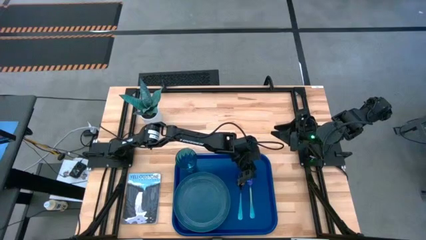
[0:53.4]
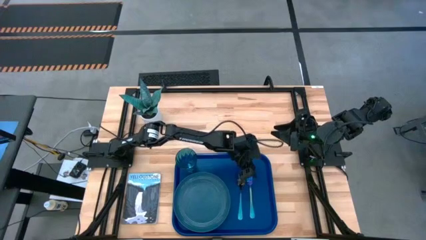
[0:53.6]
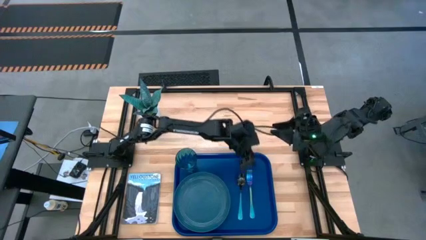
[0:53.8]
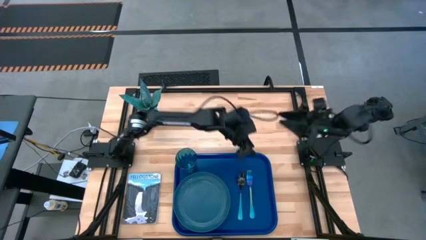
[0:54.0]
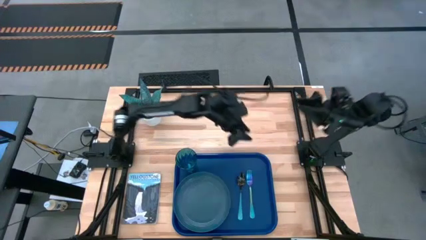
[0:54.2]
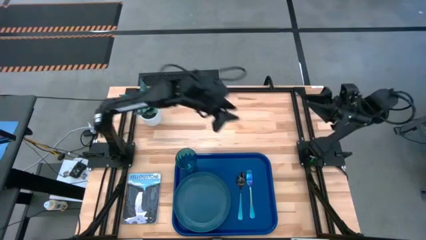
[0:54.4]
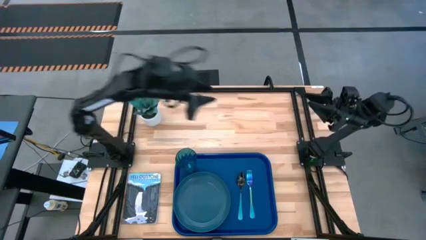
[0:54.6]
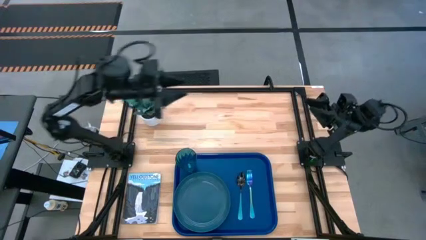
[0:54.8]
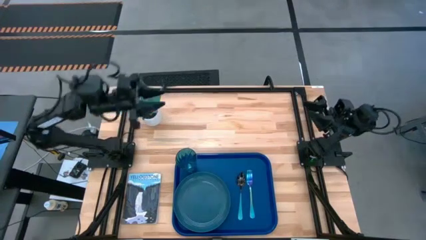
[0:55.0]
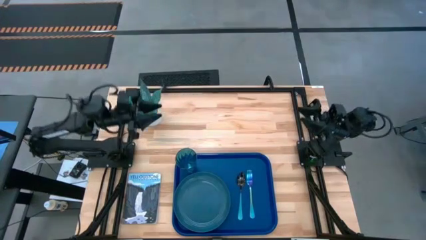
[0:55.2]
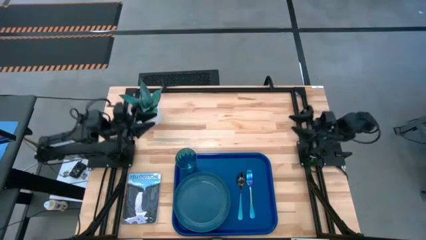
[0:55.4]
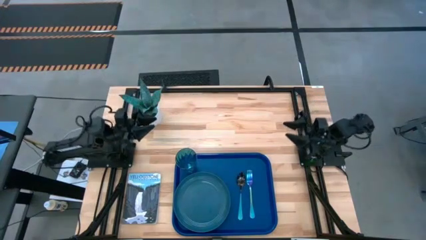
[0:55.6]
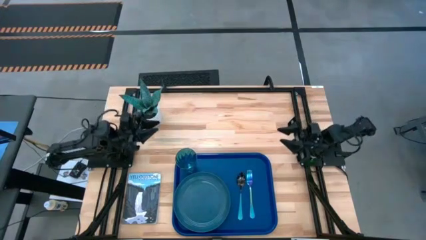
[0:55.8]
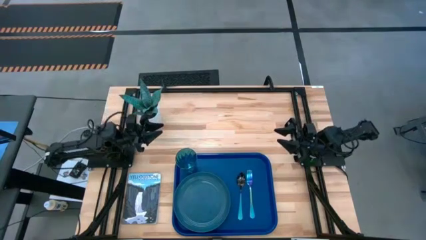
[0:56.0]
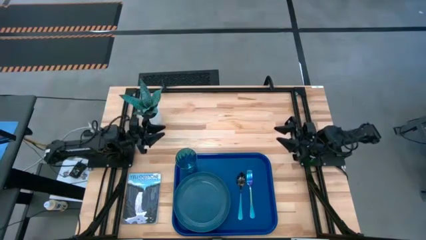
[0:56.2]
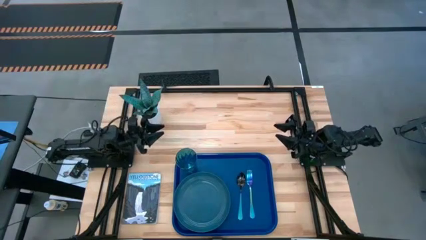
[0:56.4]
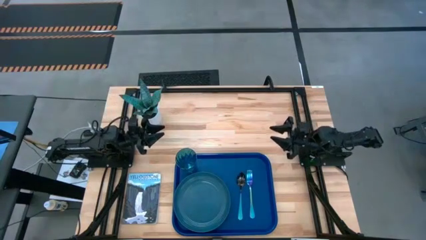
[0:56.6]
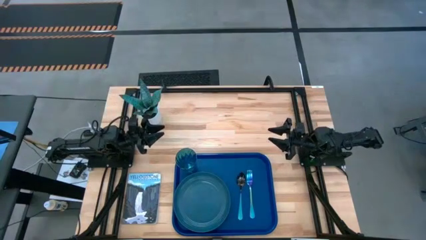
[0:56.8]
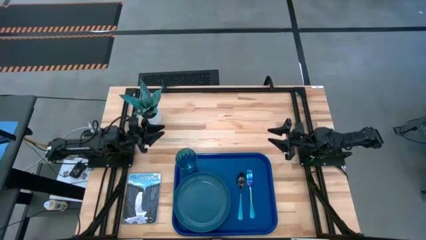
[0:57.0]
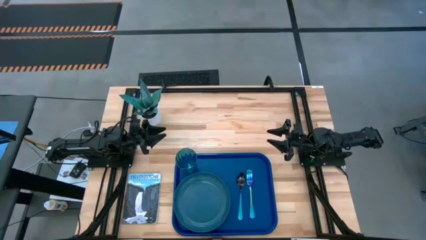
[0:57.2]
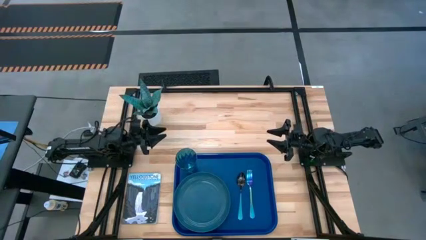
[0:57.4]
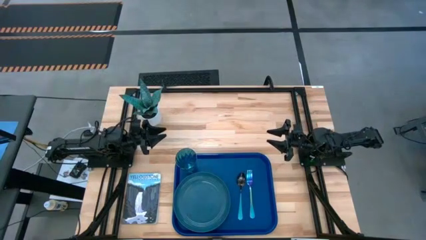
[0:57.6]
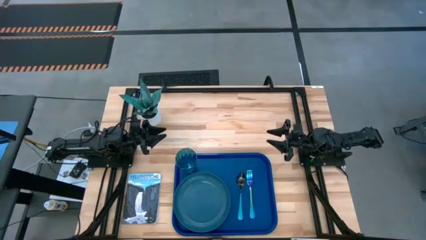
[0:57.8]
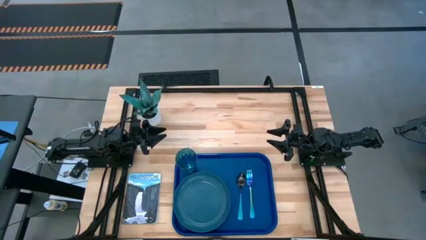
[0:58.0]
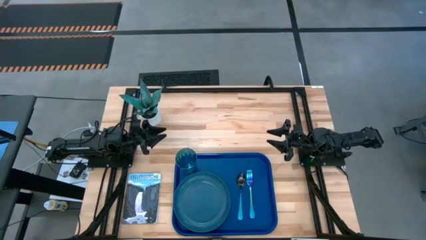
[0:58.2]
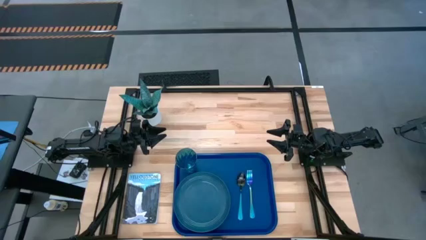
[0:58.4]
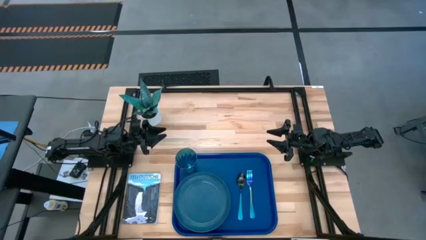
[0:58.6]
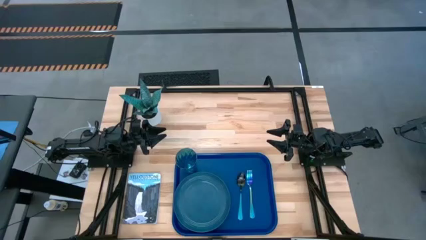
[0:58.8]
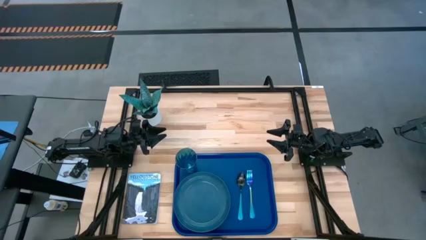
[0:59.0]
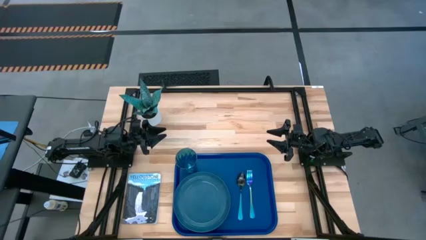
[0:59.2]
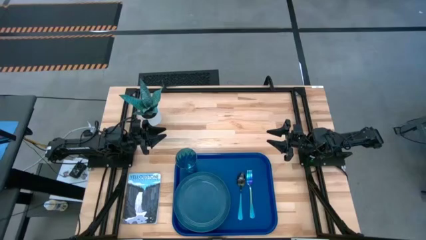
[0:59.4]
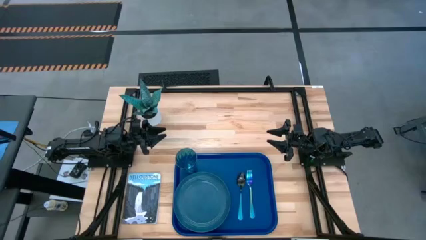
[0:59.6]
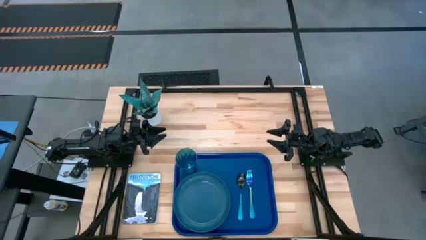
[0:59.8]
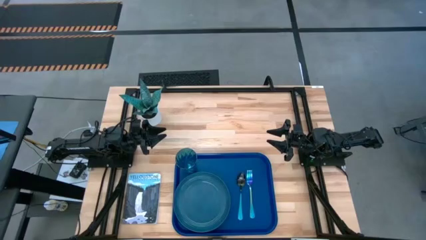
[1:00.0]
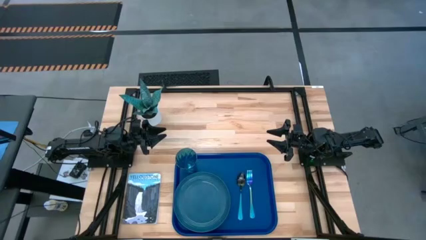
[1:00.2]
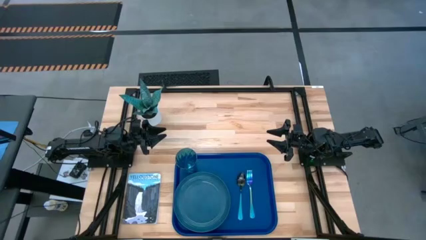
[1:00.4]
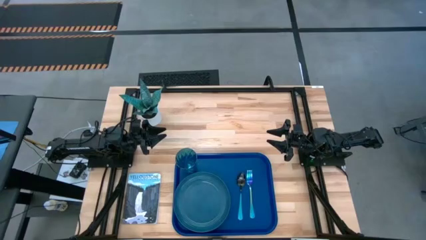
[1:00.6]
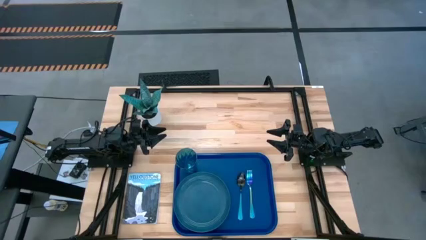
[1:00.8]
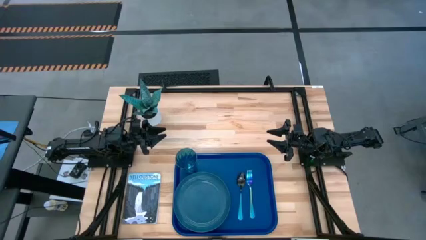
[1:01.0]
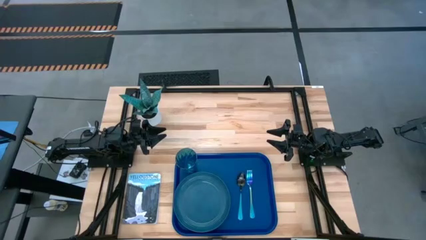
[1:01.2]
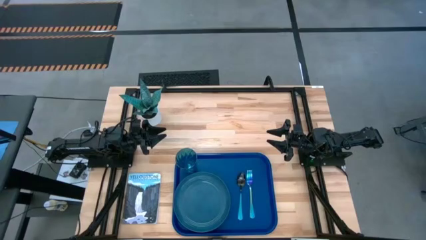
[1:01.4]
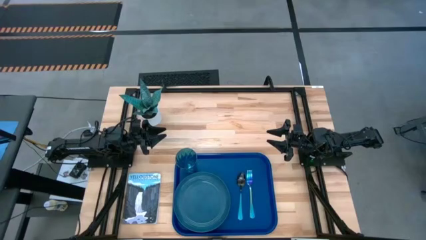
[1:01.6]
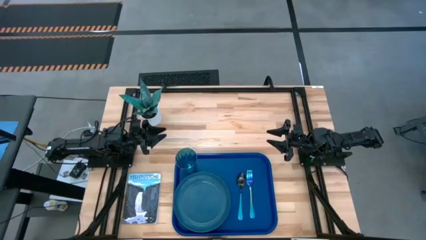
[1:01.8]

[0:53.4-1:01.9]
Task: Pick and place plate/cup/fork/spoon on tray
Return to Home Position

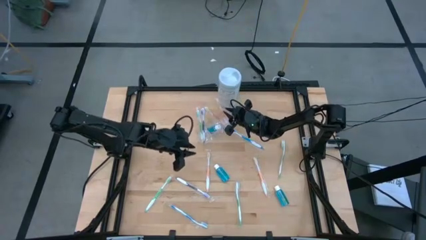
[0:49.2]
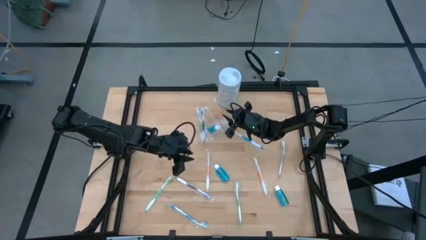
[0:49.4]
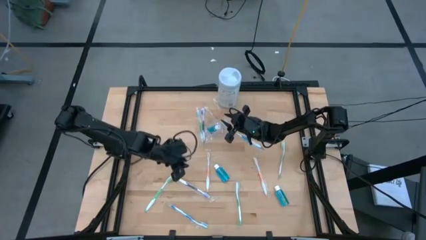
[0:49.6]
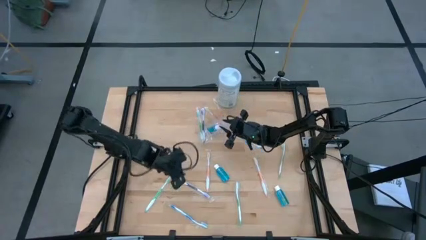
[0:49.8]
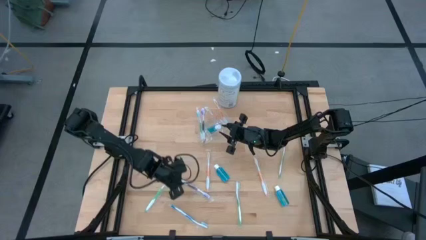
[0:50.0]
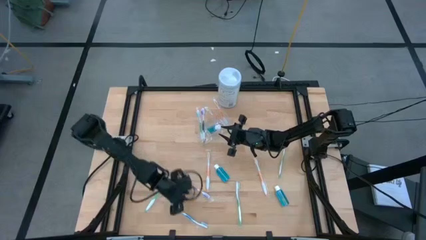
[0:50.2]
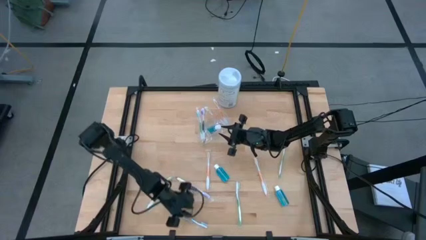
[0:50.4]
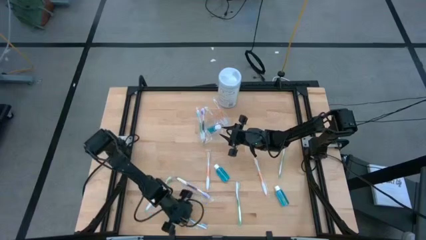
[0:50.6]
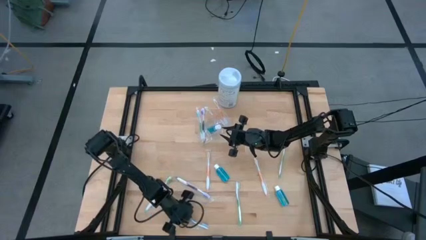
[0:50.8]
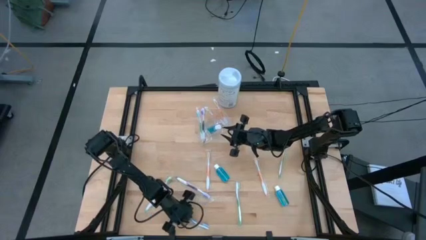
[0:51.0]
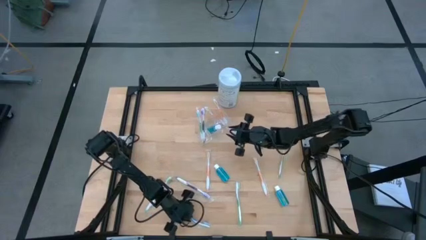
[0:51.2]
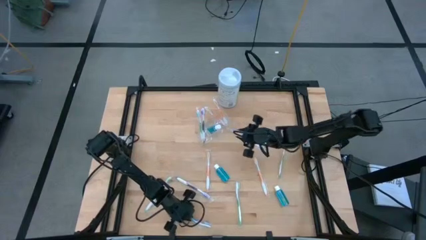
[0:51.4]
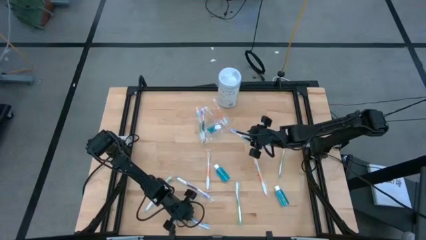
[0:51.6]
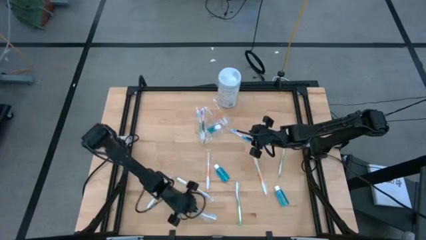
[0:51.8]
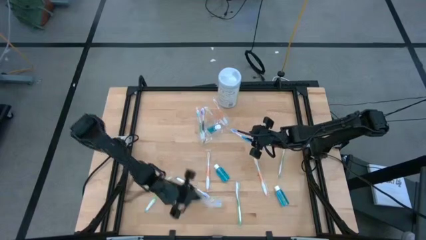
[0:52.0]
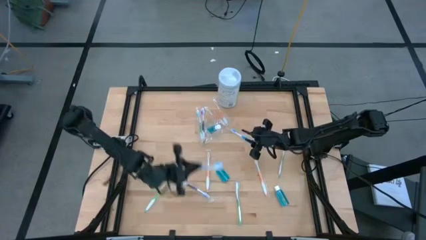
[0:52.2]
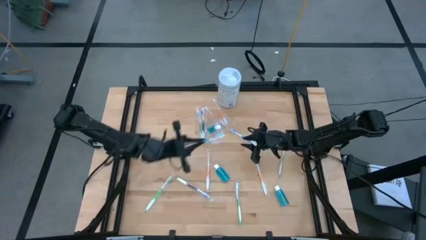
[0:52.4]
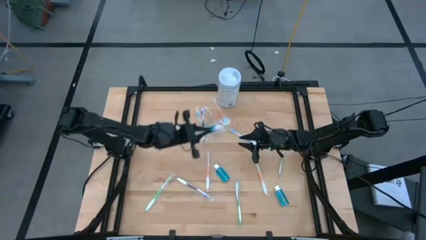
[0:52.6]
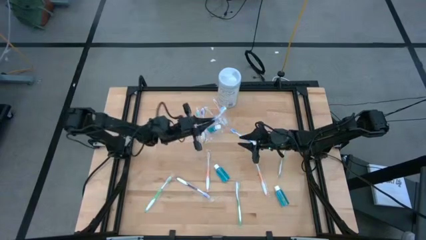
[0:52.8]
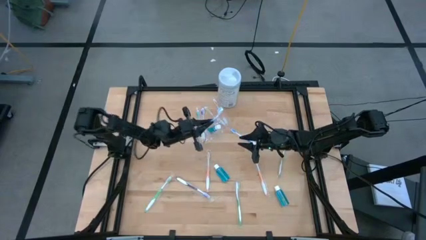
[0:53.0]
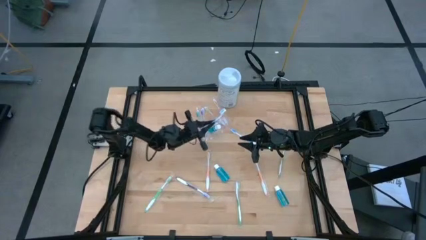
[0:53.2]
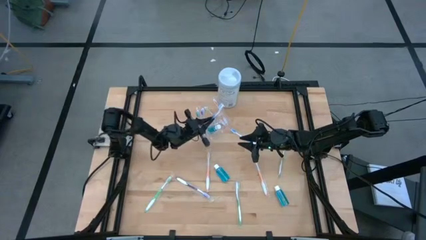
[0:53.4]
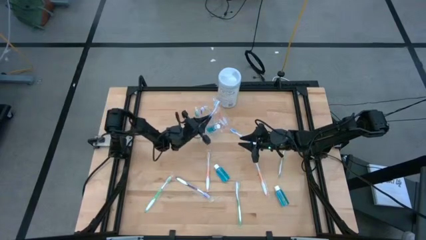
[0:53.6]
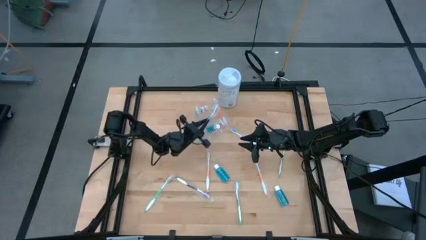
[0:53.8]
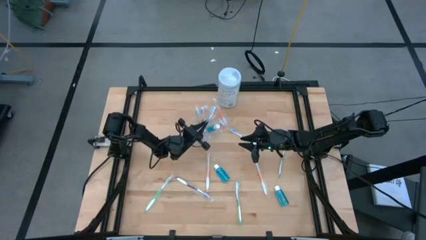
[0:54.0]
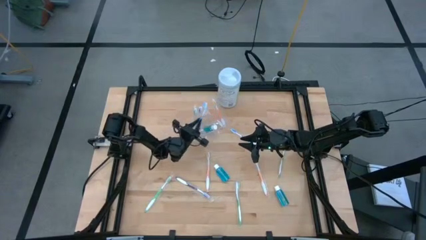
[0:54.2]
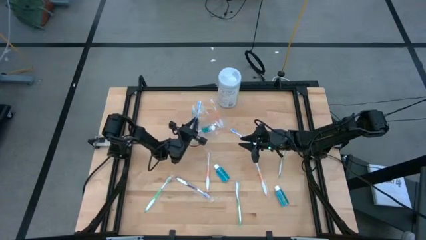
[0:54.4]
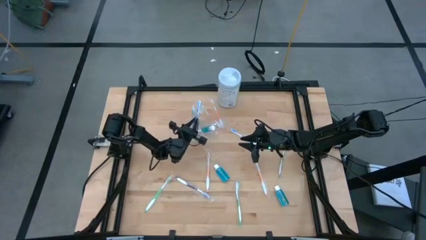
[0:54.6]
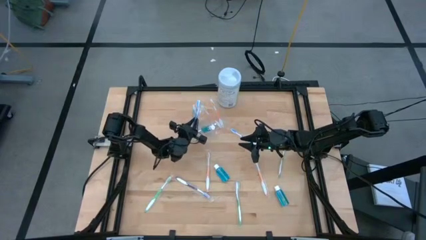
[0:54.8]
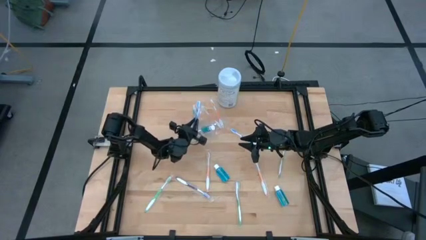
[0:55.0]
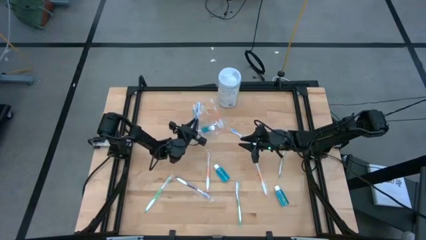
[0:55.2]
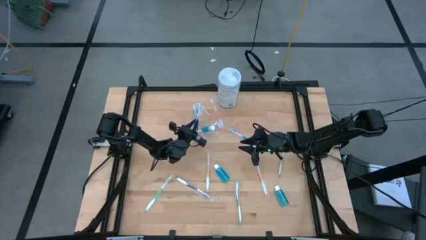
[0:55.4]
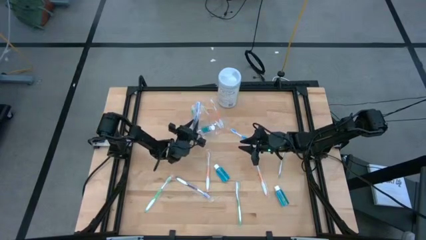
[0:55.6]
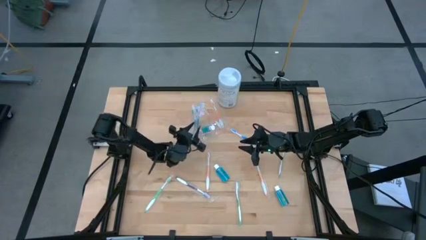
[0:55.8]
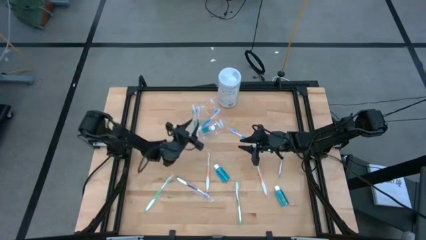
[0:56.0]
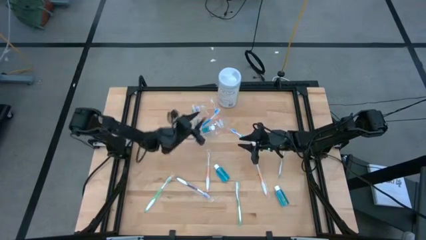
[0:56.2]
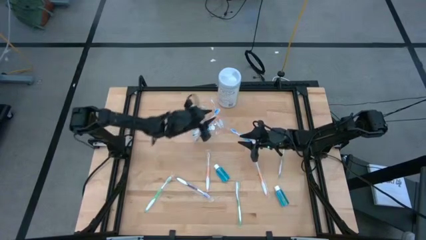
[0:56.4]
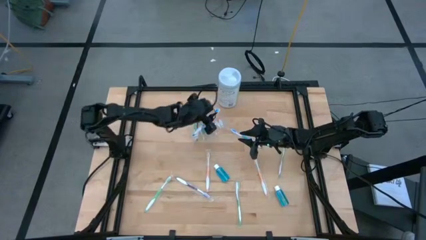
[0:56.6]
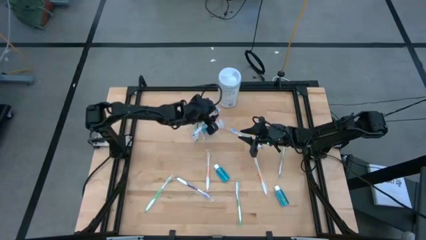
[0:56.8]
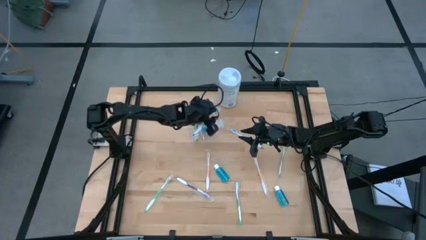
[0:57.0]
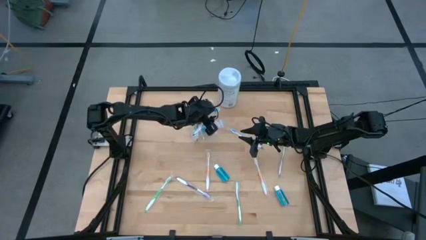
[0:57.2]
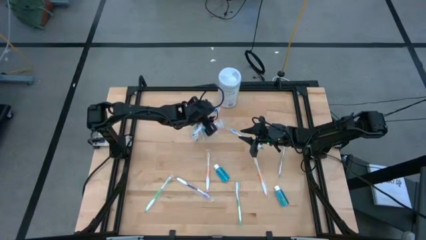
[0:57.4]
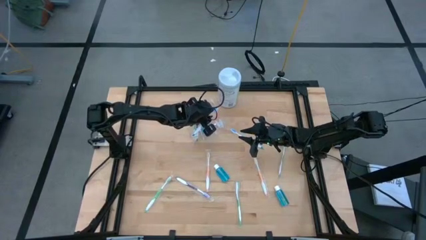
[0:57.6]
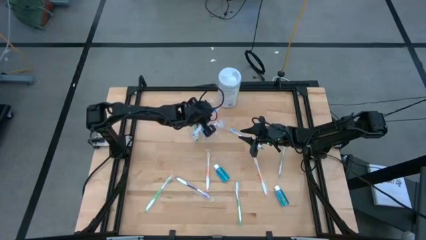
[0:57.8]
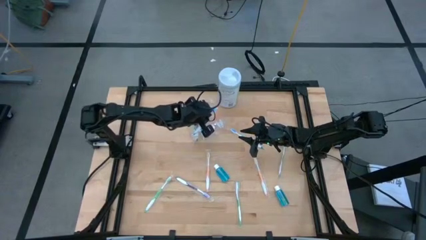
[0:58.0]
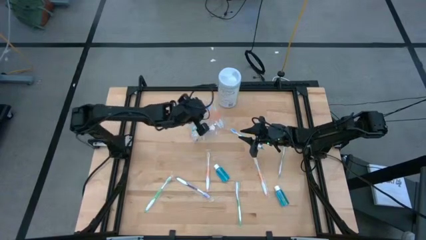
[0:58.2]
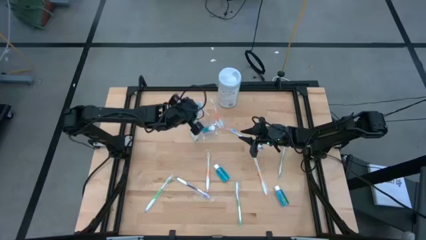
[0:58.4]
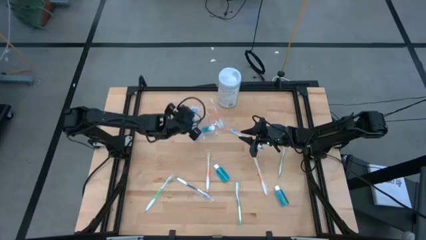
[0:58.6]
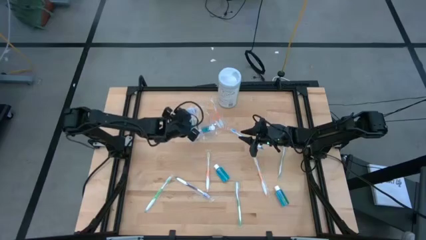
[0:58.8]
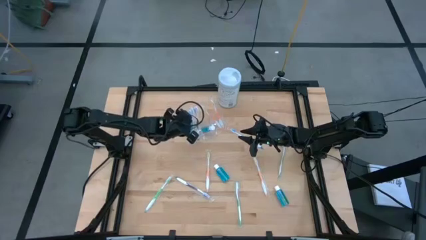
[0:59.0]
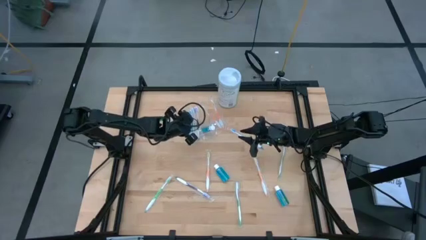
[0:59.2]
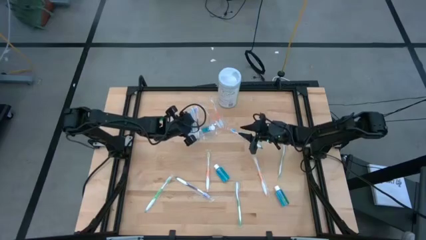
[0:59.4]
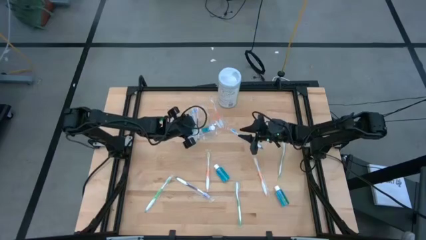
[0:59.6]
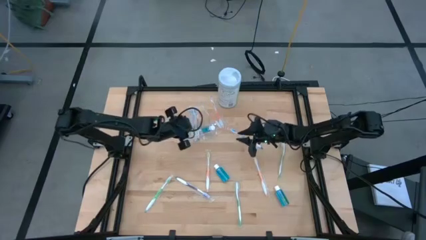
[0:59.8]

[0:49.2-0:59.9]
Task: Pick & Place toothbrushing station
Put the blue toothbrush into the transparent organizer
